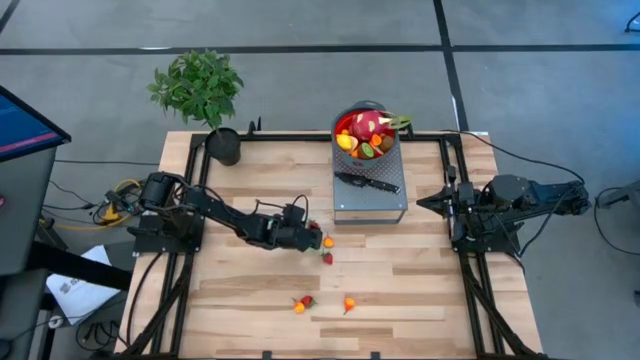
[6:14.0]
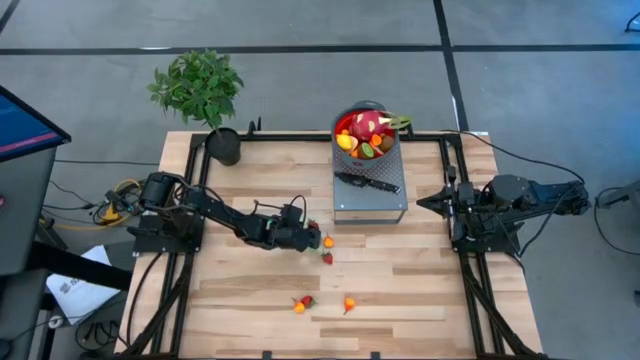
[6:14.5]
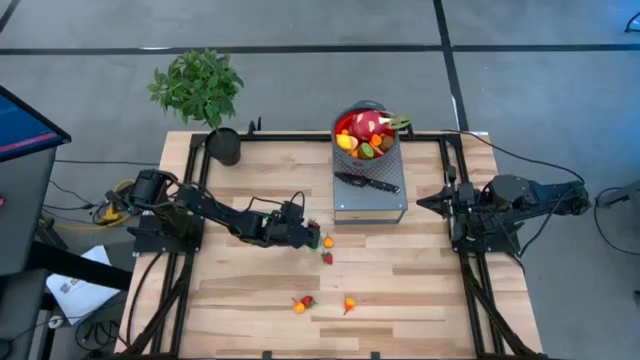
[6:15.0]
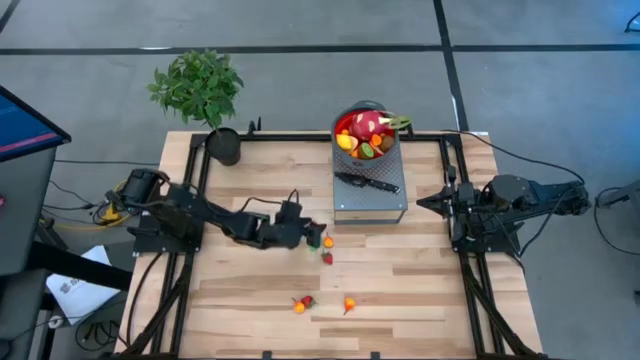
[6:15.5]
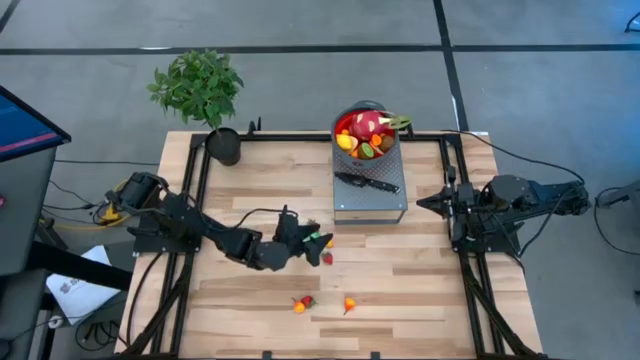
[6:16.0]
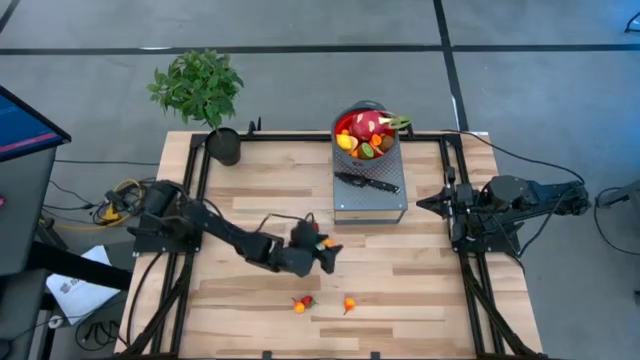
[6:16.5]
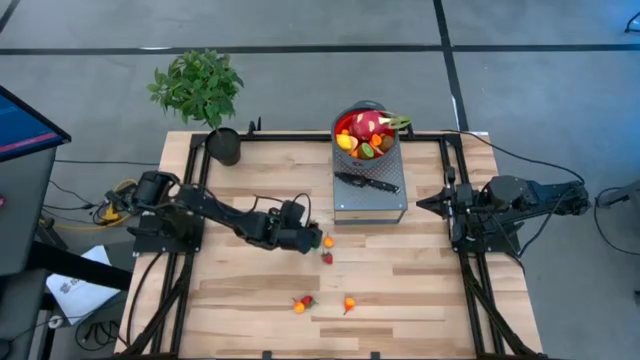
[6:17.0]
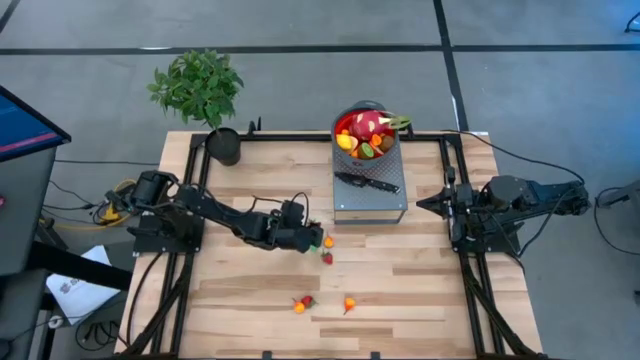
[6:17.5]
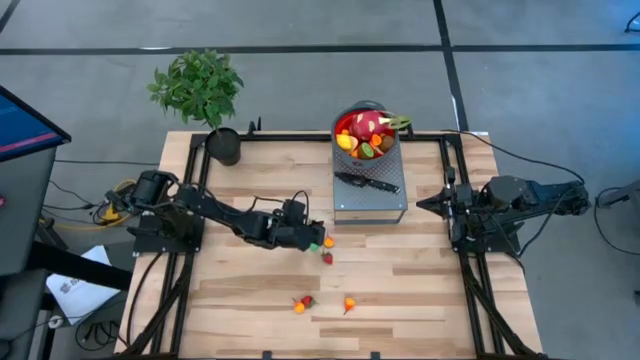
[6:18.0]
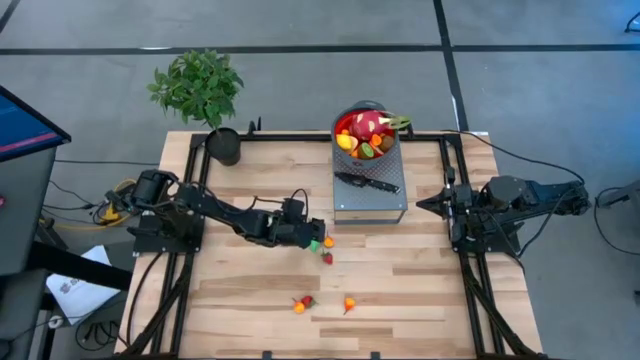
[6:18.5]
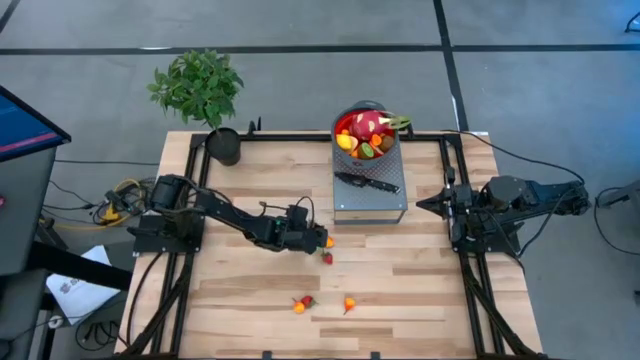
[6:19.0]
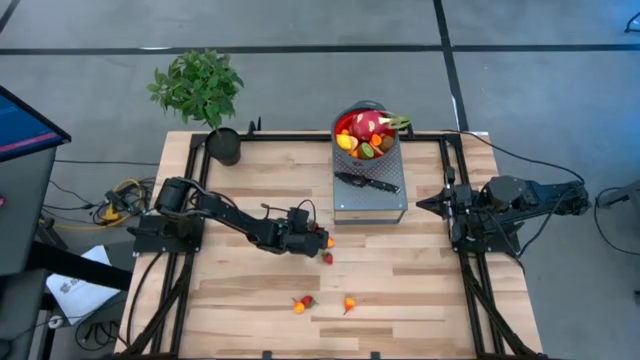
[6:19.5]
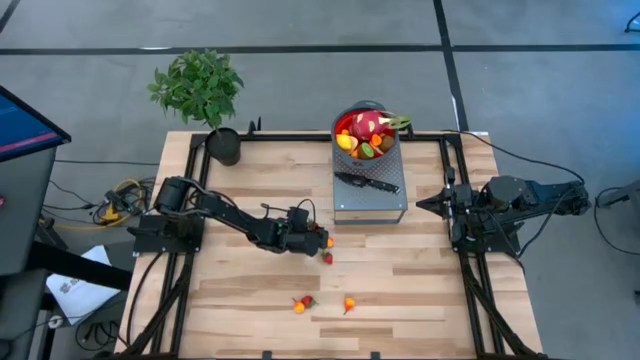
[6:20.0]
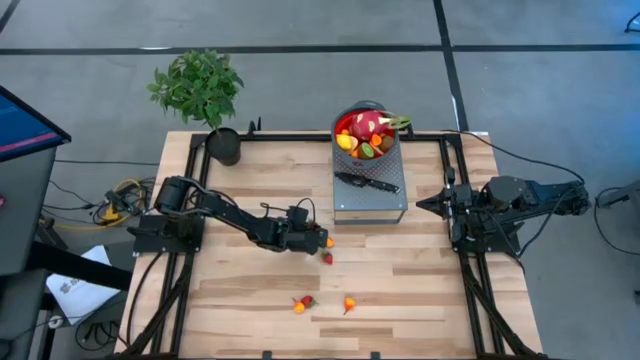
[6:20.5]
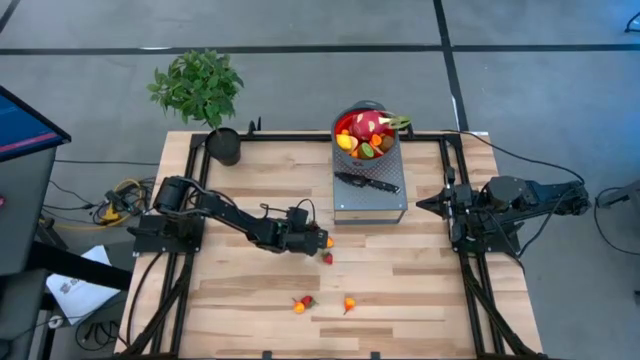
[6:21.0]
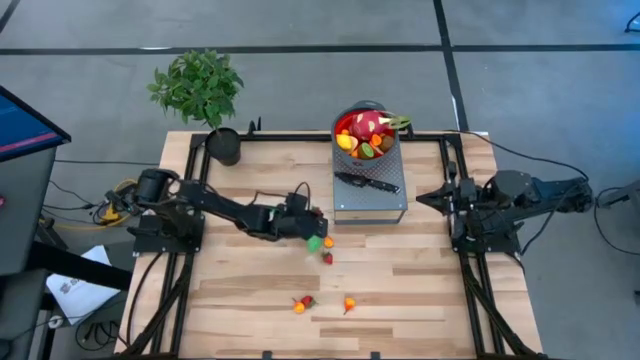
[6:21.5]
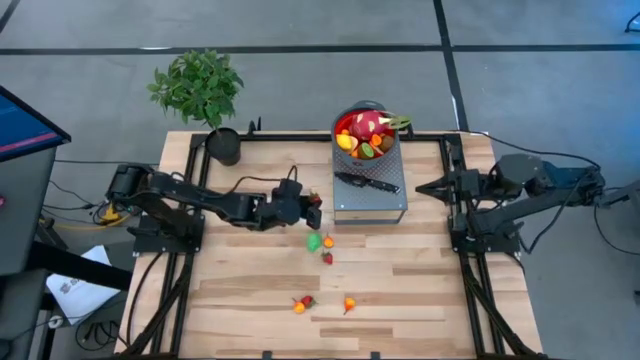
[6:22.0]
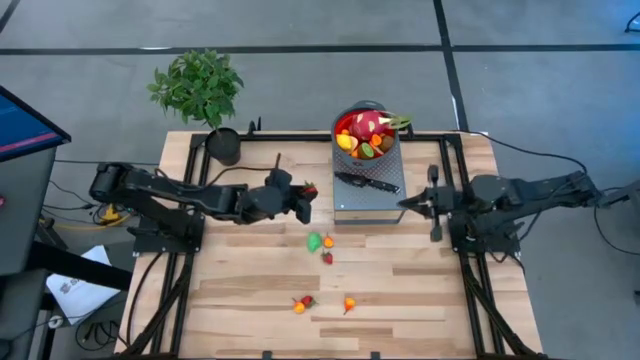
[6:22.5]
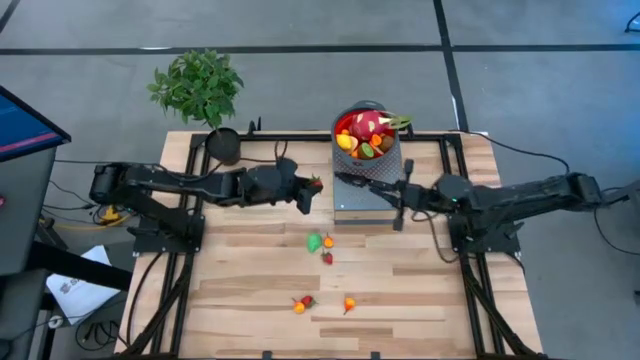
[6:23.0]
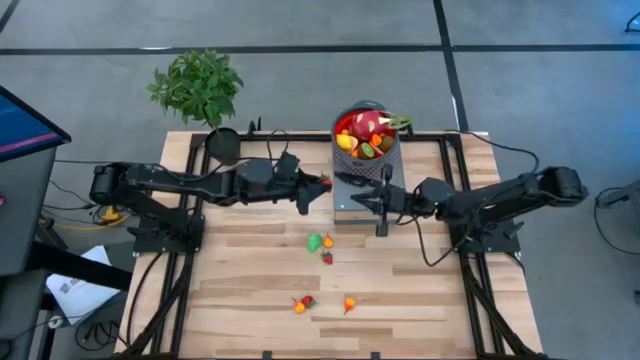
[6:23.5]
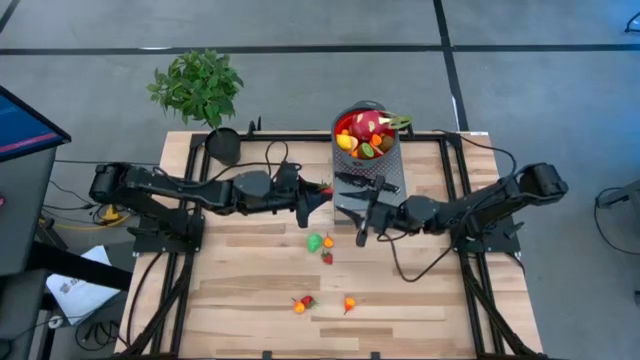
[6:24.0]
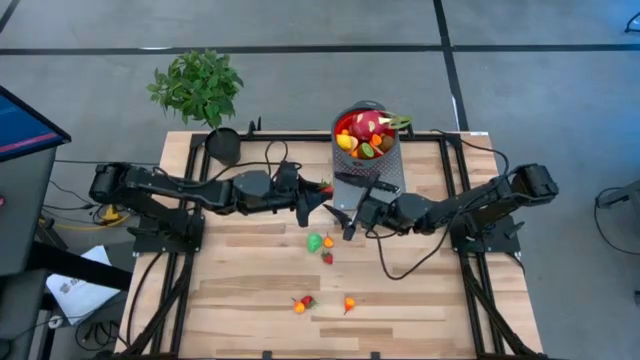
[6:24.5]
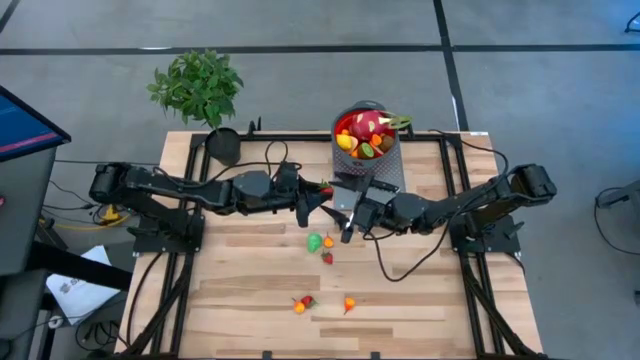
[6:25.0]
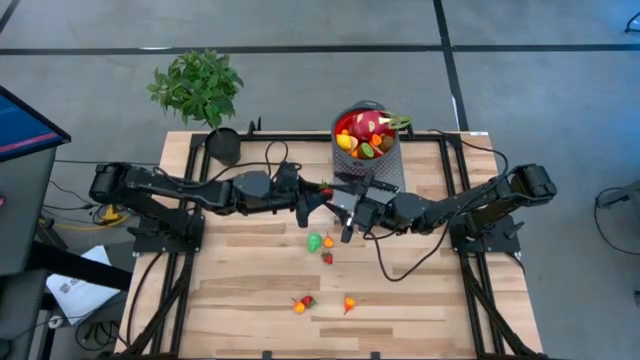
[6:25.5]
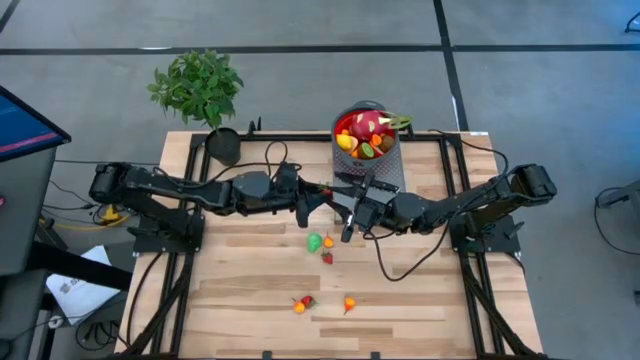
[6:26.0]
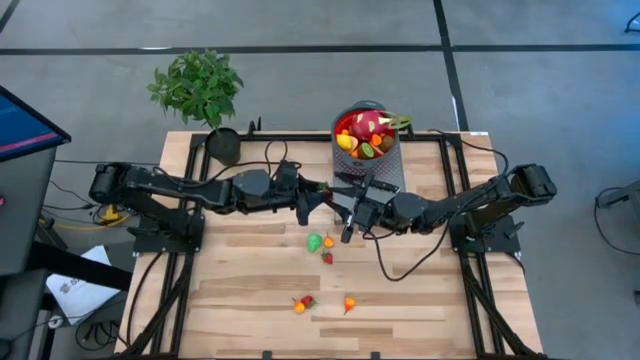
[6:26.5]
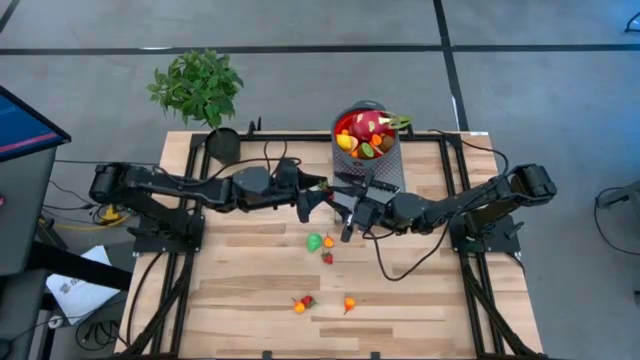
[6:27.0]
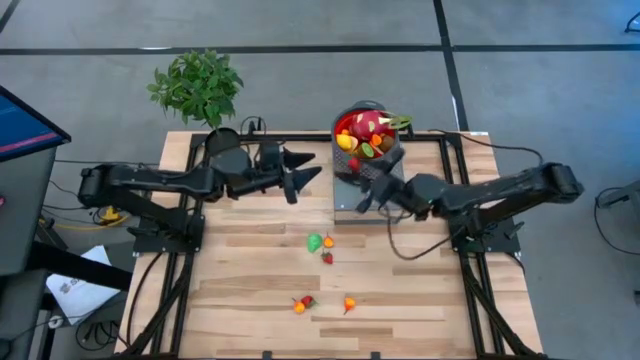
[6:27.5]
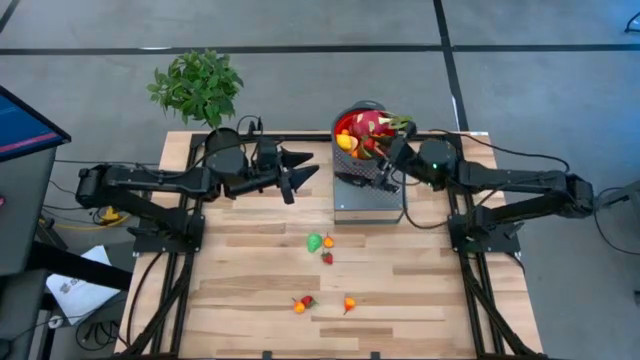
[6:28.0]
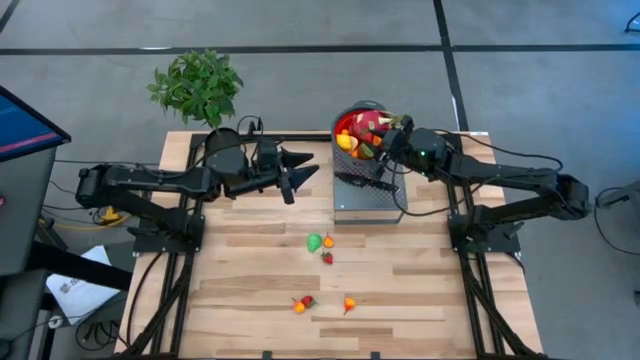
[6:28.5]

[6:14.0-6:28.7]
Task: Pick & Place Fruit
Put the strawberry into the red colander on the shelf

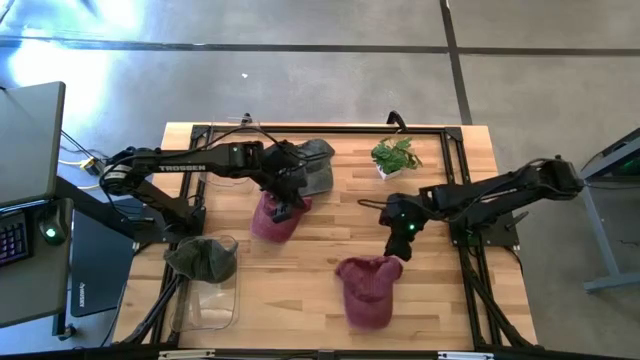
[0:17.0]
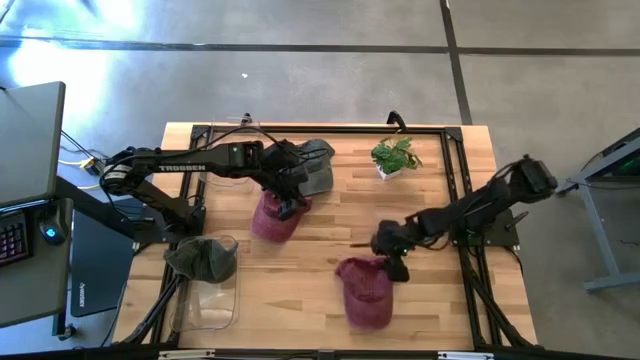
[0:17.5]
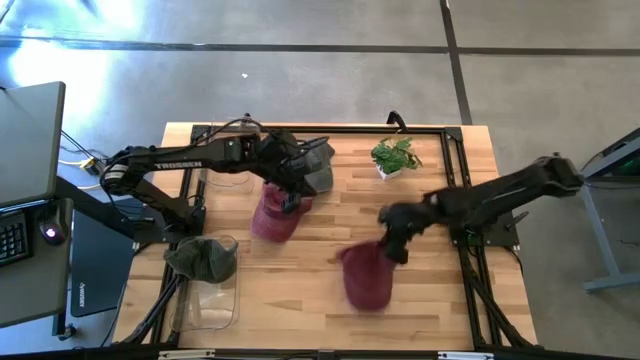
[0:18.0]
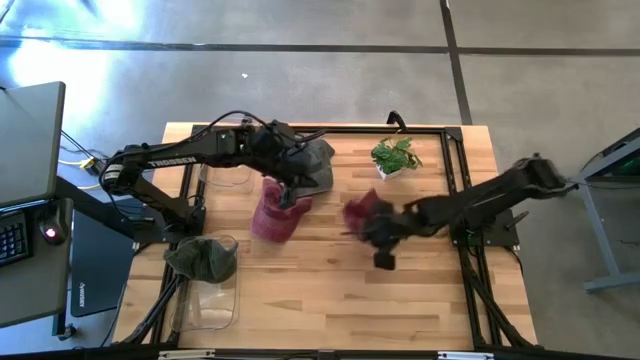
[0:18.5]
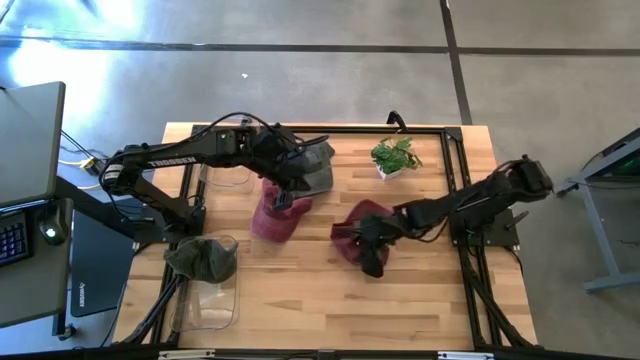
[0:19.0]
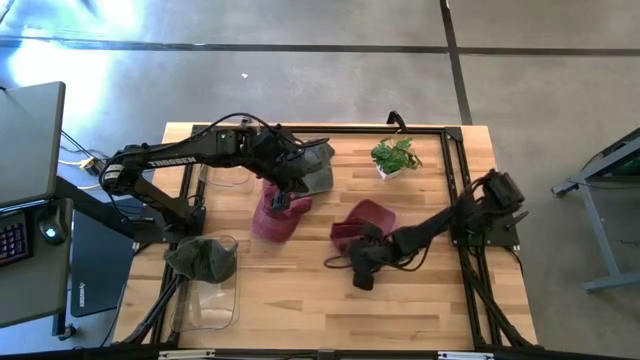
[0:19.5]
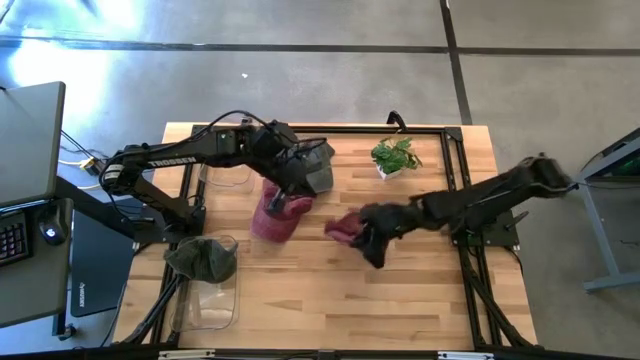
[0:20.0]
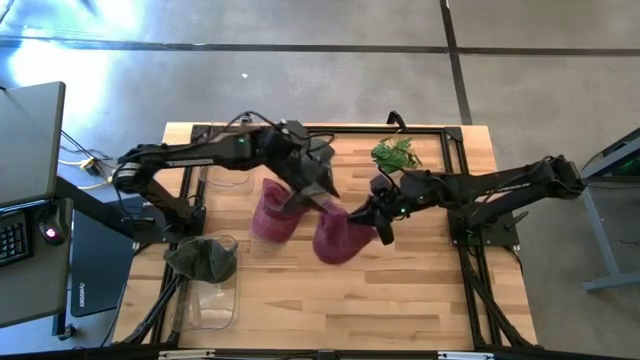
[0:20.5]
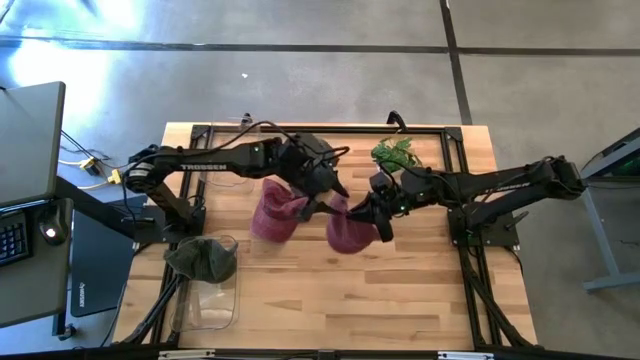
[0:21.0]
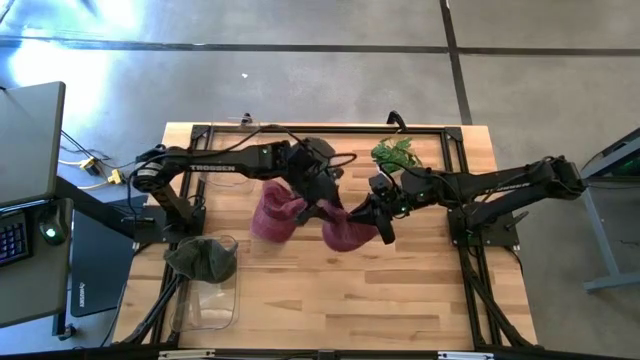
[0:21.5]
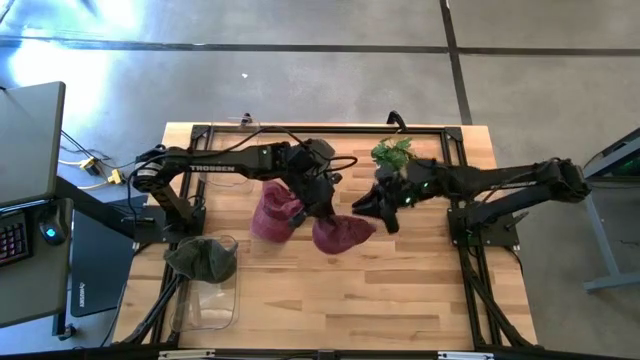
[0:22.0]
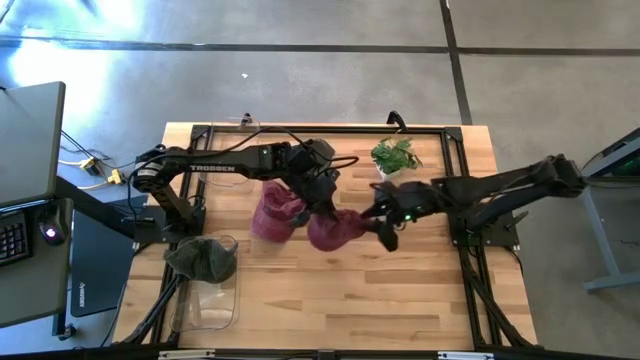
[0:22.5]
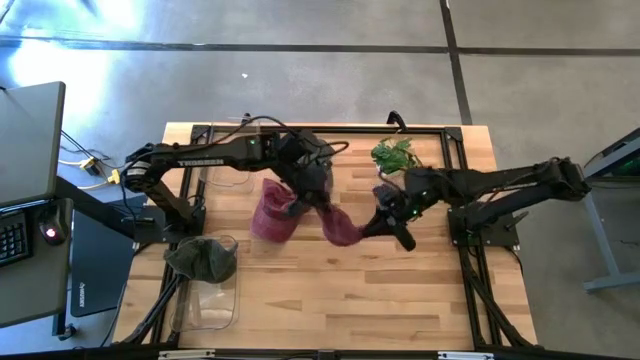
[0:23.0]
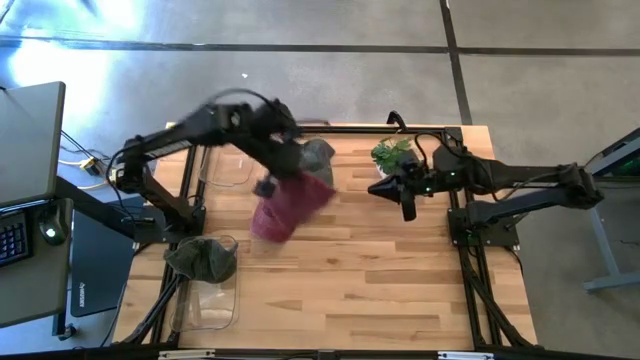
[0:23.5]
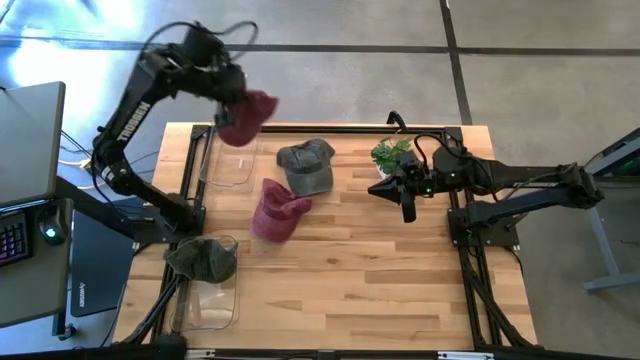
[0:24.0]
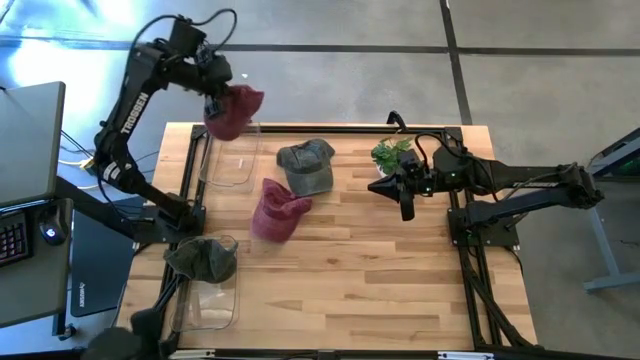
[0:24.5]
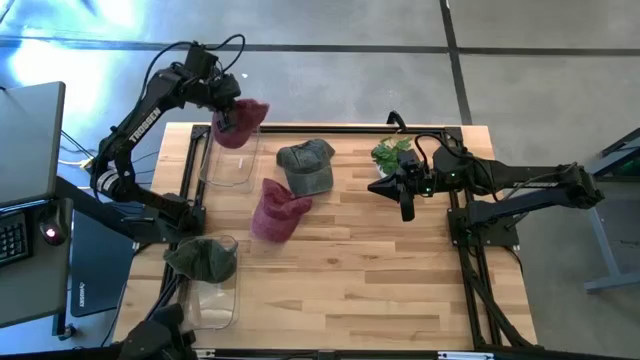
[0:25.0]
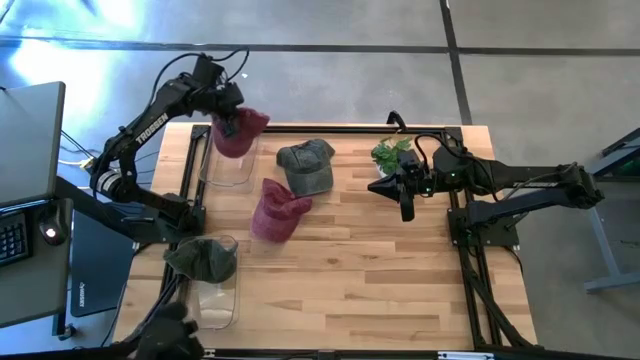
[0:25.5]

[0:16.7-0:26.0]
Task: Pick & Place hat
Put the bottom red cap into the top transparent bin
